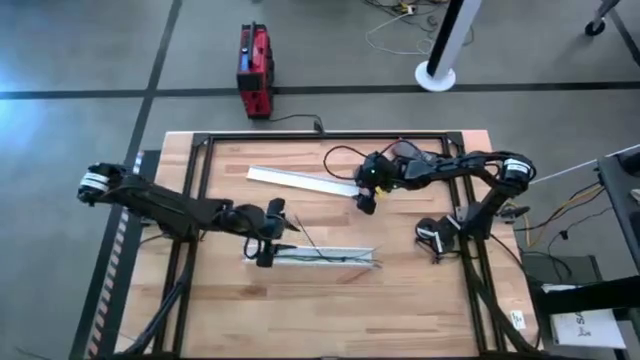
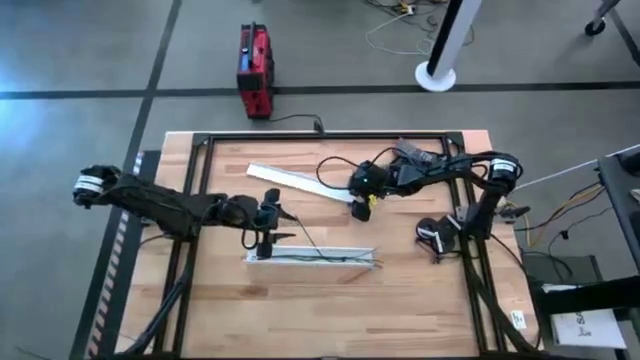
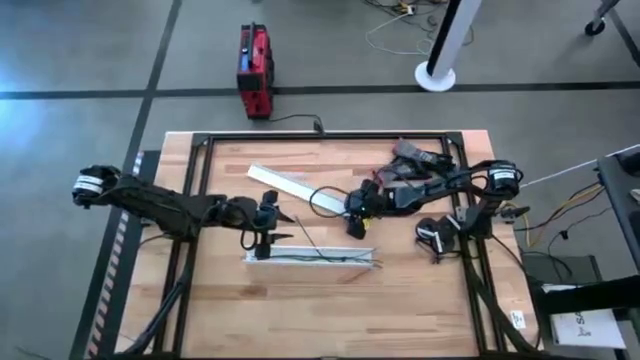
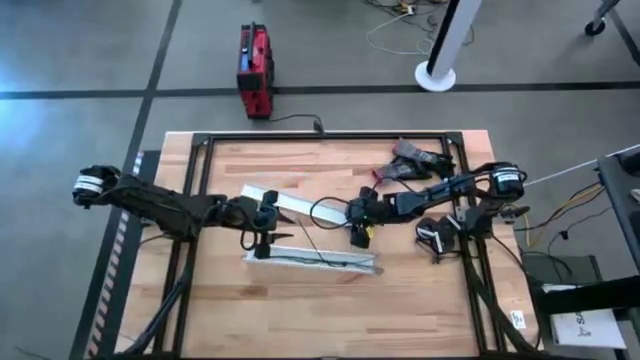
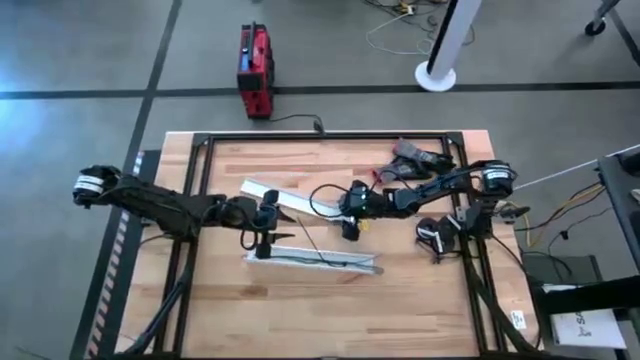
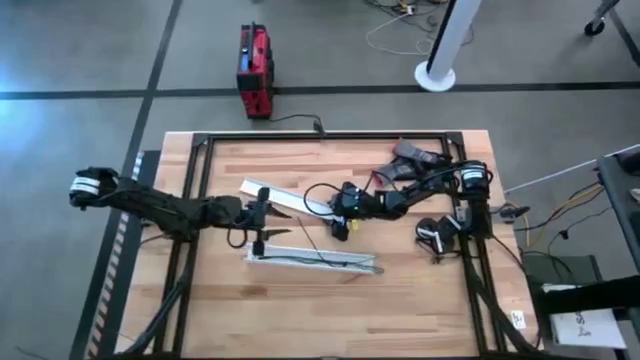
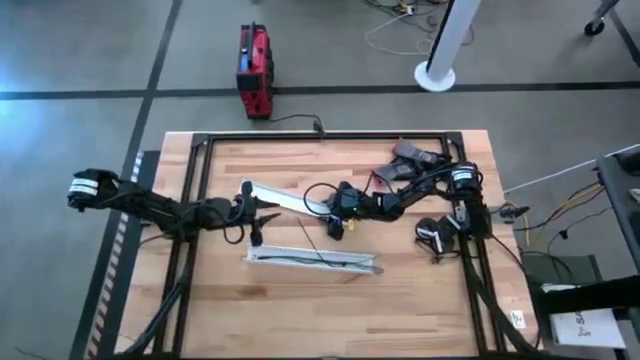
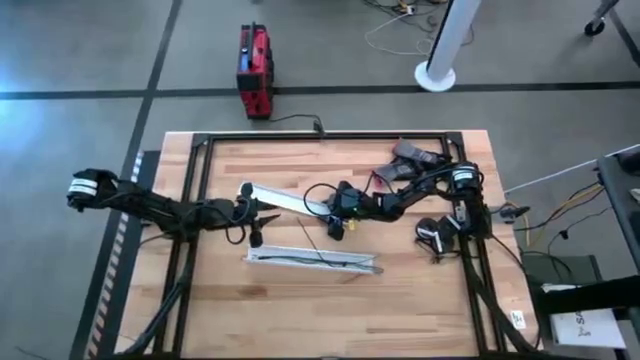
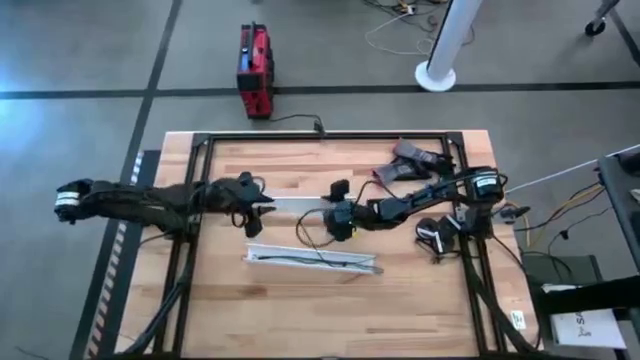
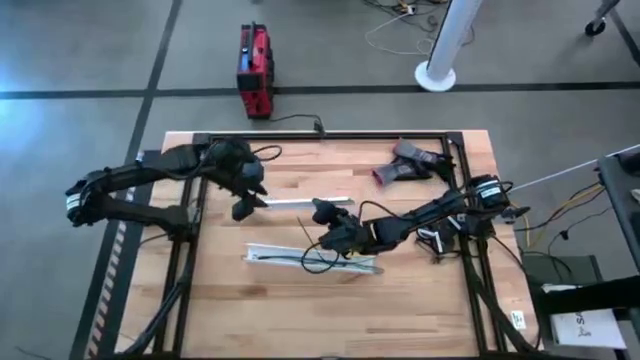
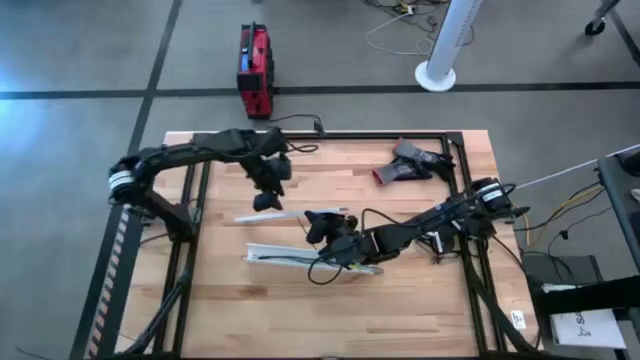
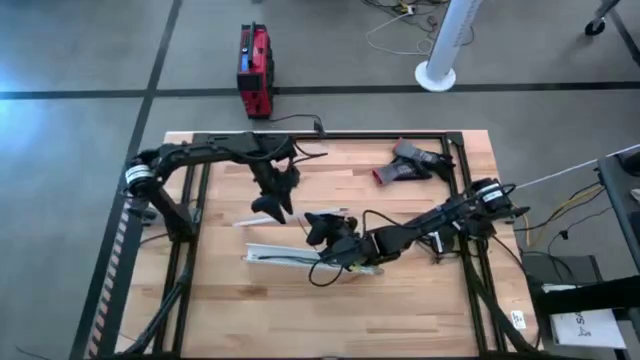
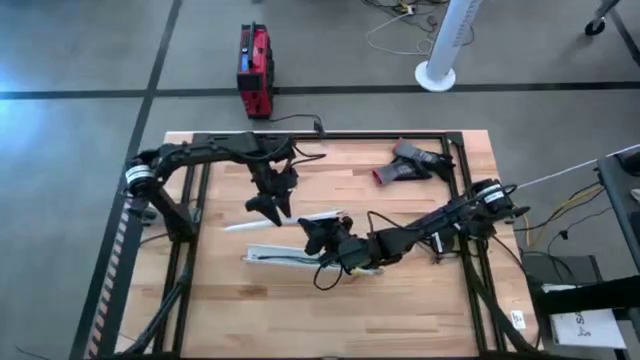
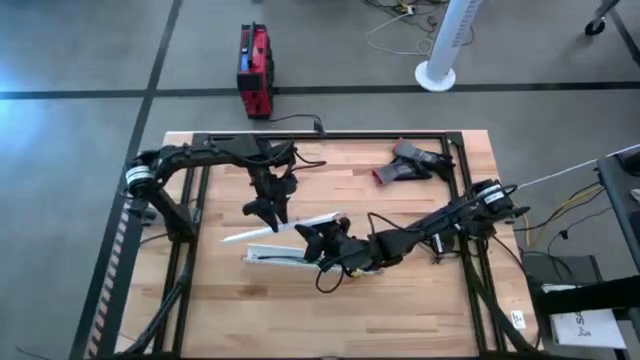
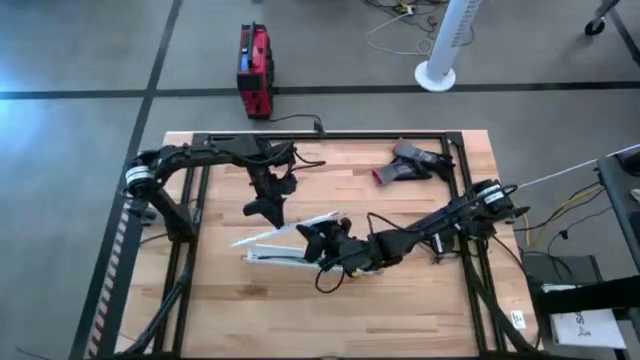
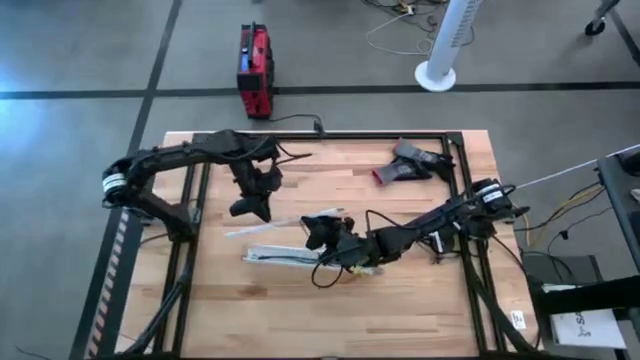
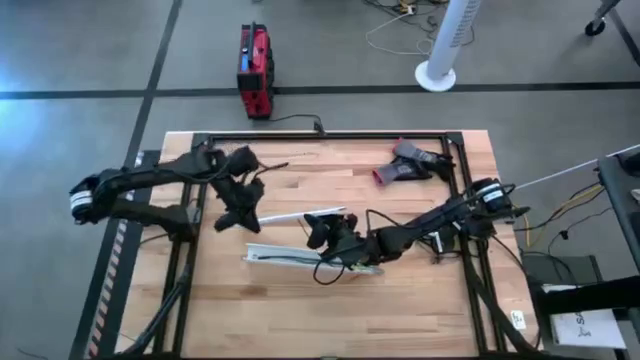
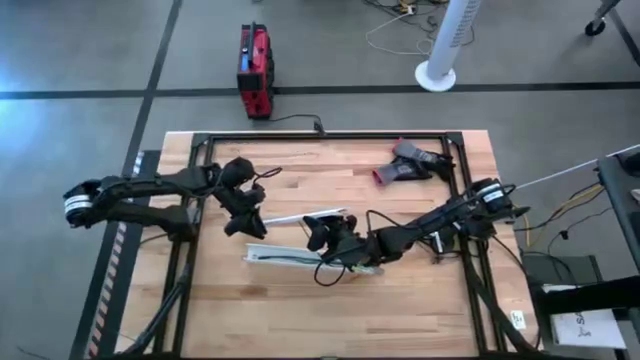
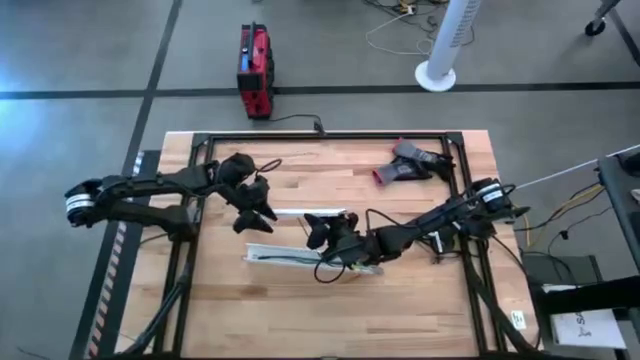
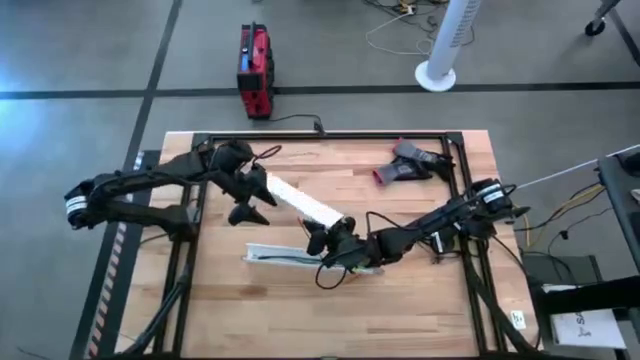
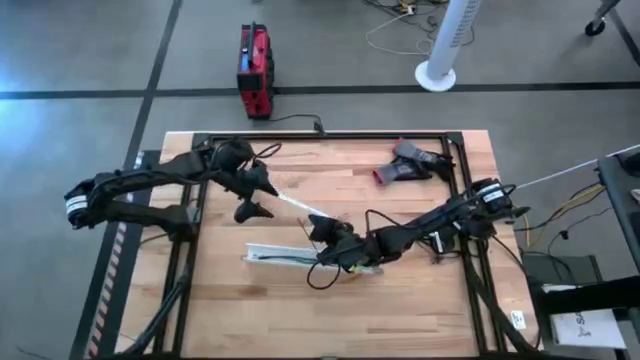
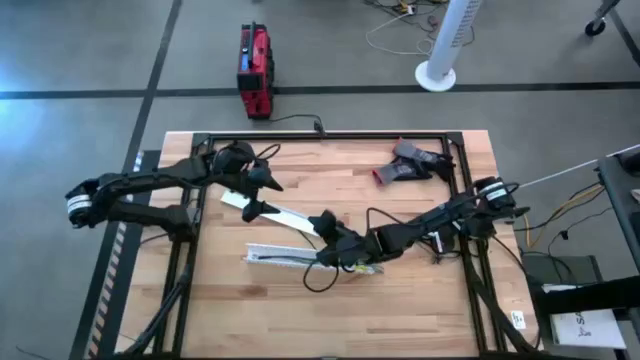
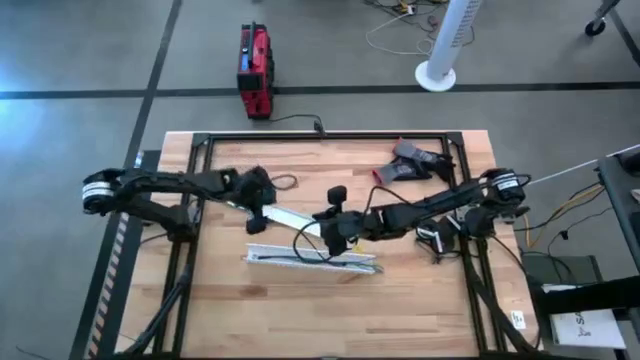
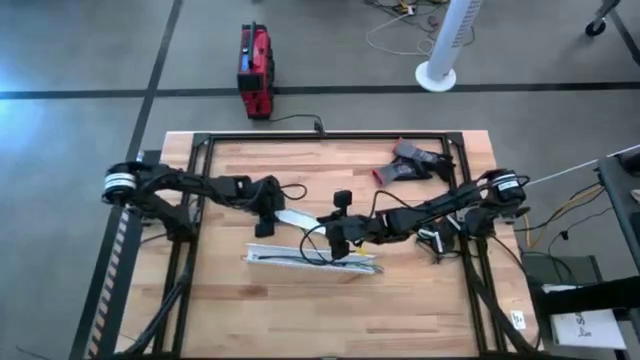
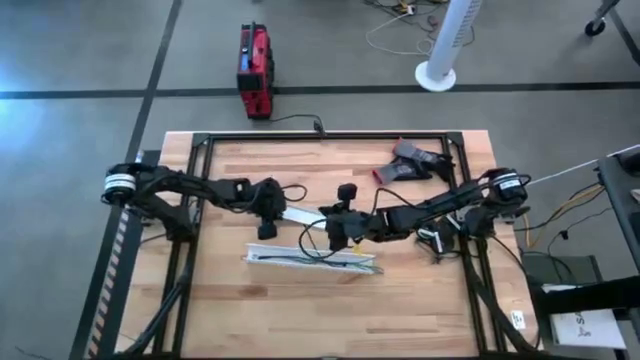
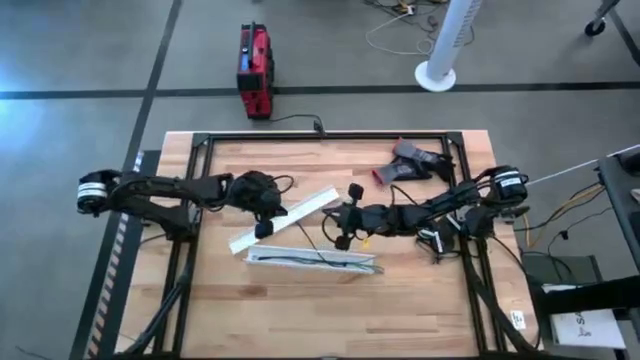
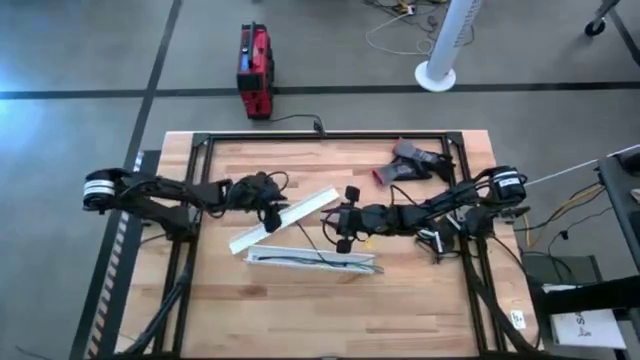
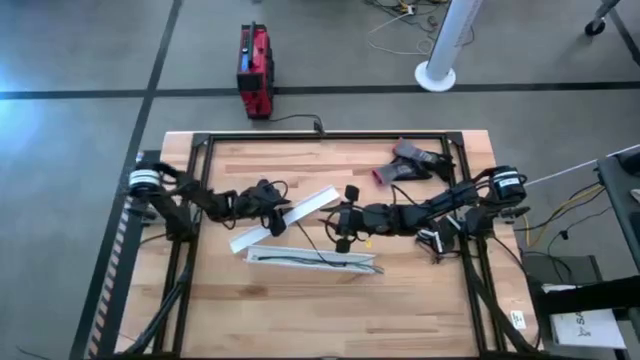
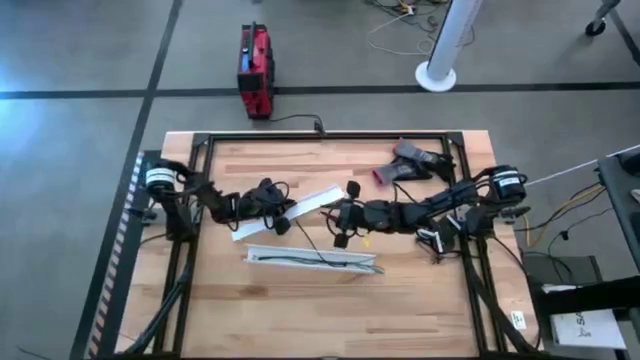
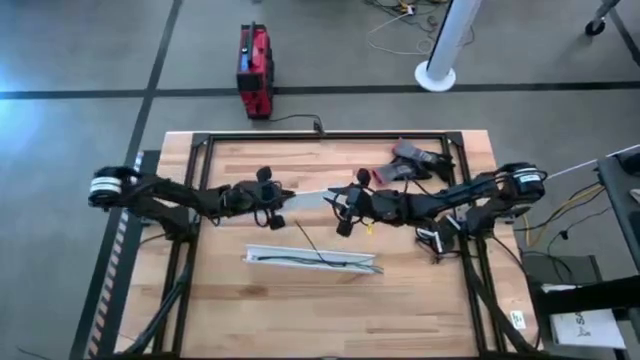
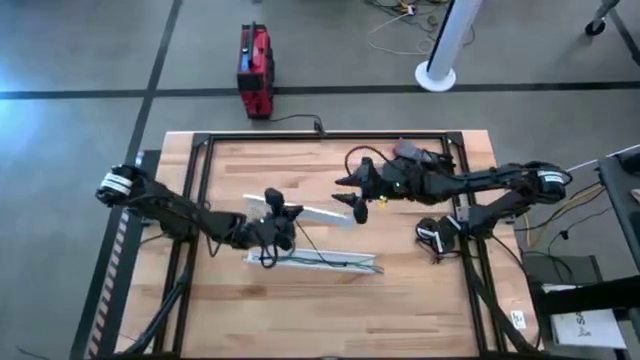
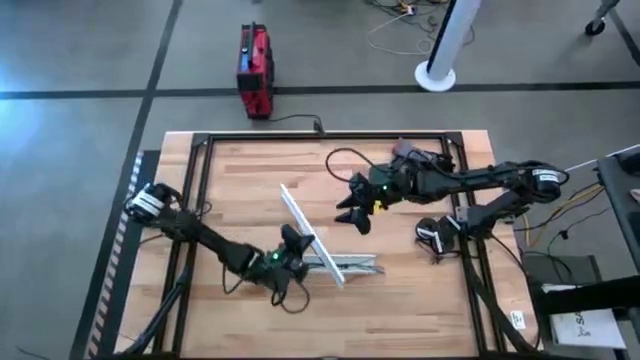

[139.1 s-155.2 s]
Task: Ziptie cables
Close the white cable duct

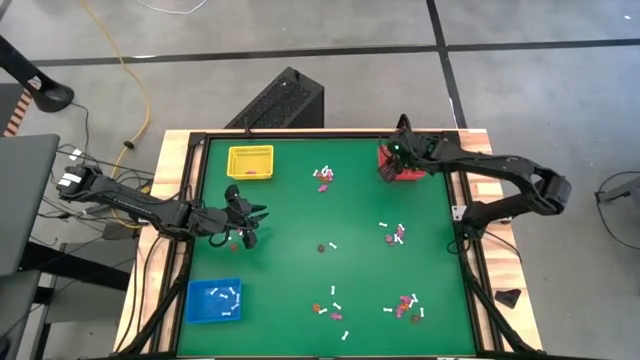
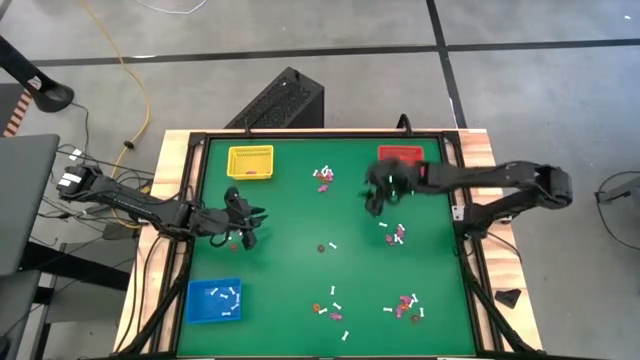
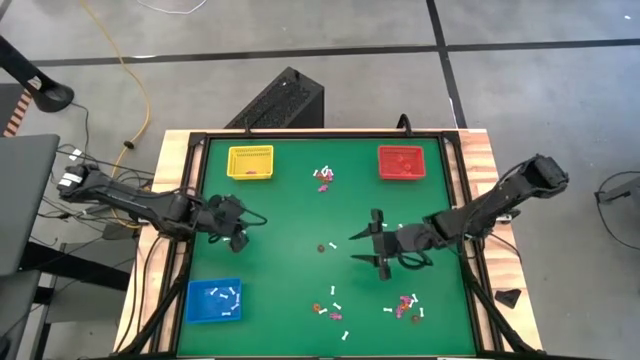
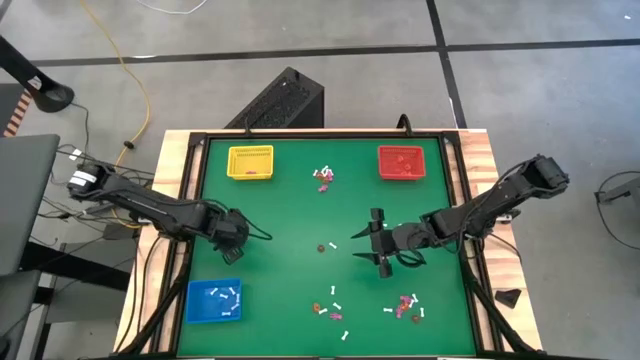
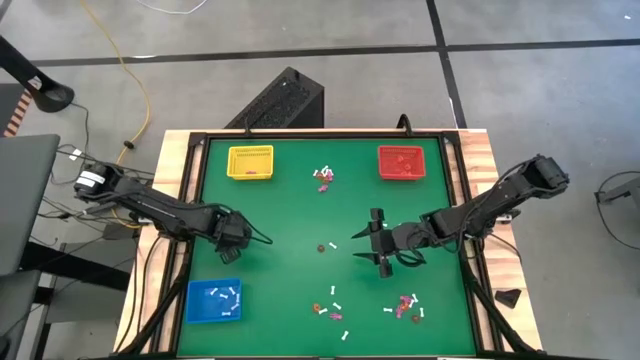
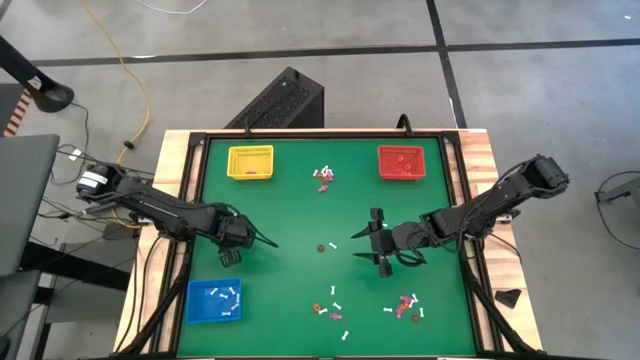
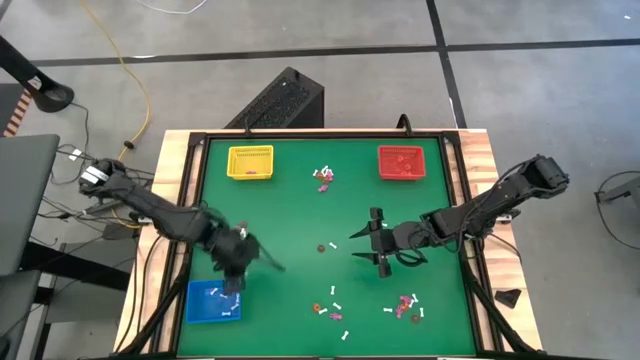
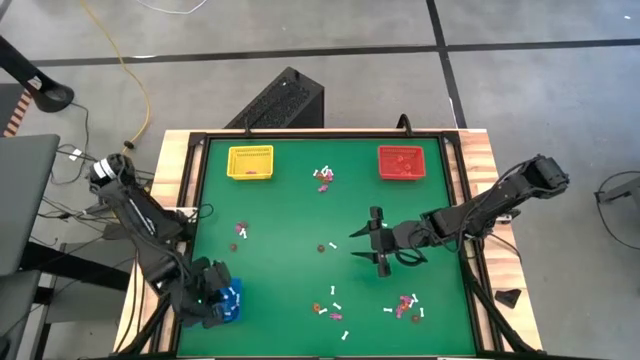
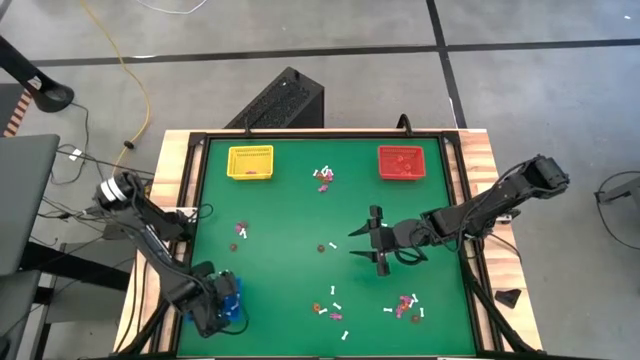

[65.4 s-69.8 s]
Task: Sort Halloween decoration
Put the white bone toy into the blue bin
